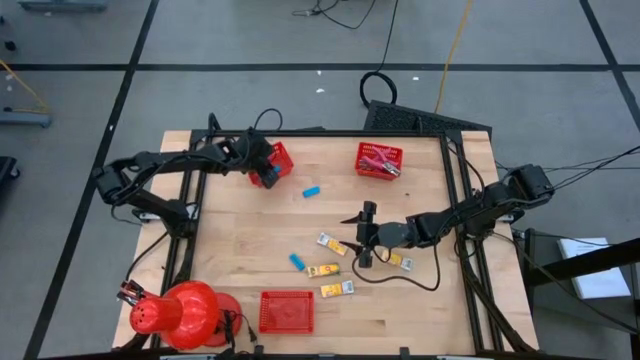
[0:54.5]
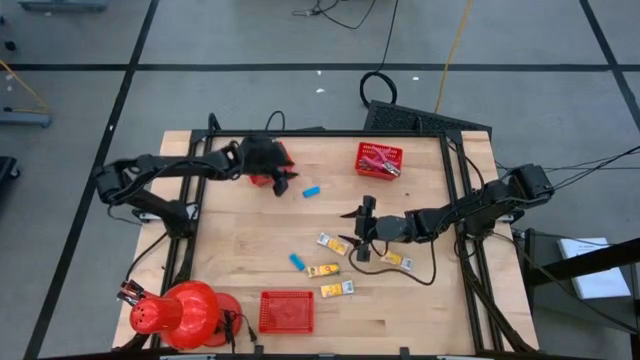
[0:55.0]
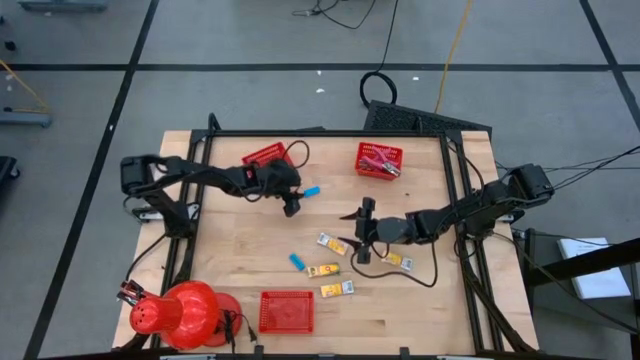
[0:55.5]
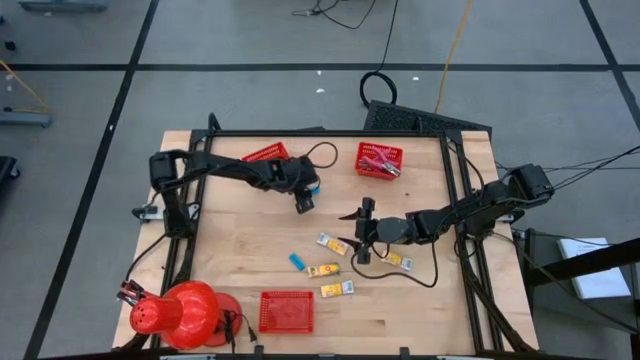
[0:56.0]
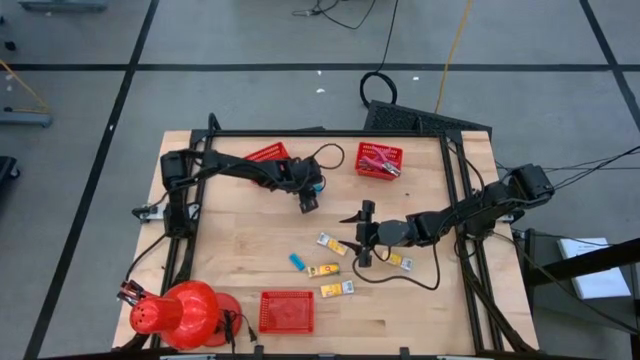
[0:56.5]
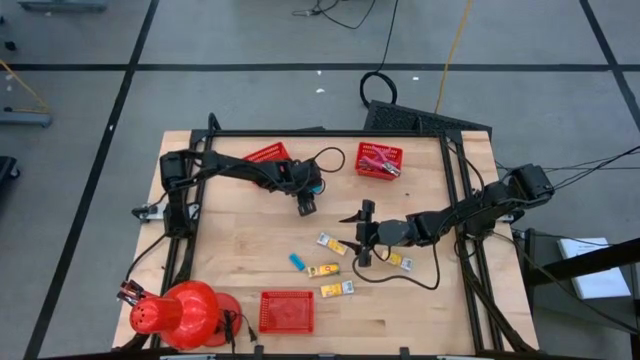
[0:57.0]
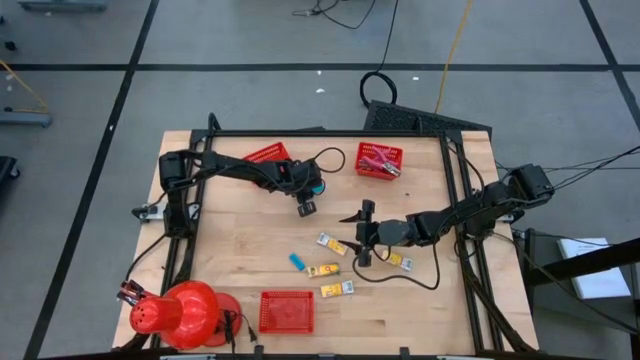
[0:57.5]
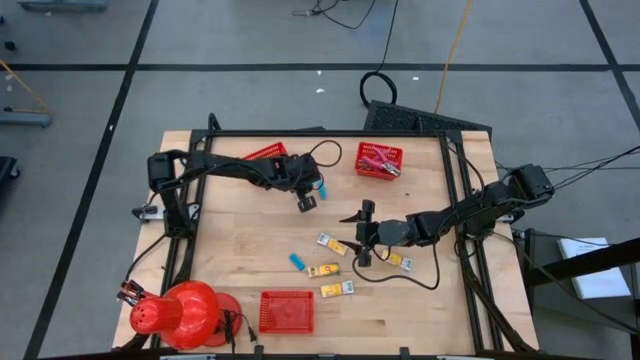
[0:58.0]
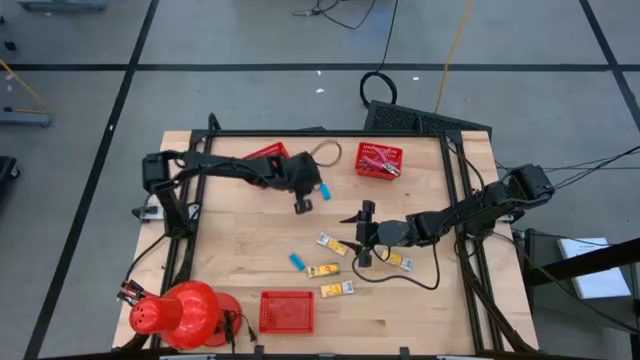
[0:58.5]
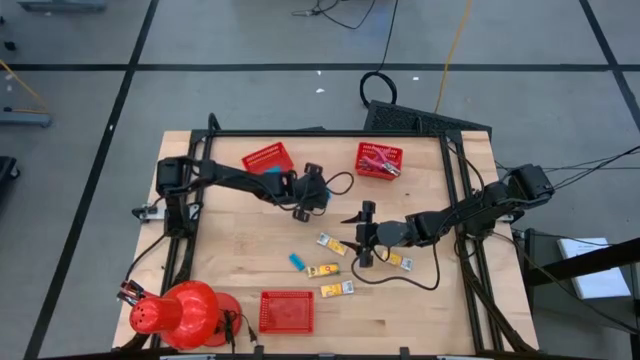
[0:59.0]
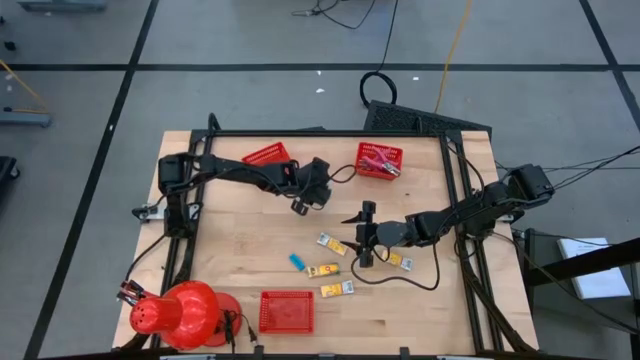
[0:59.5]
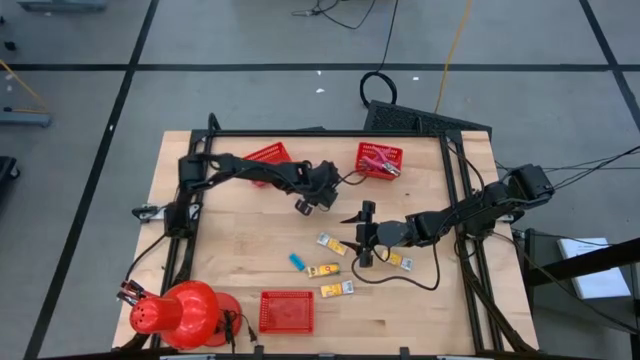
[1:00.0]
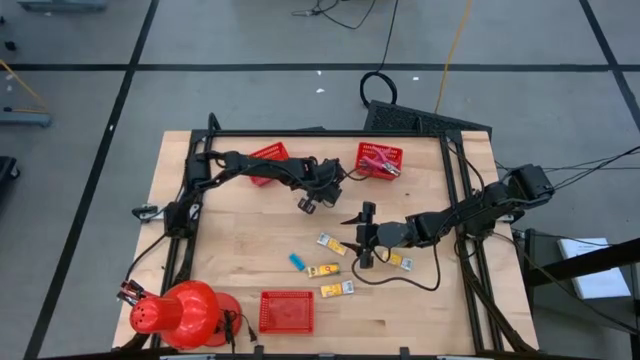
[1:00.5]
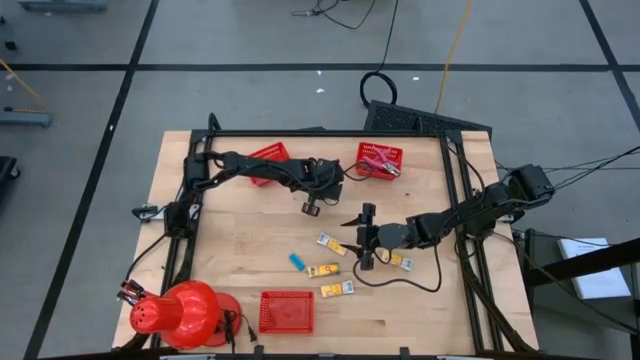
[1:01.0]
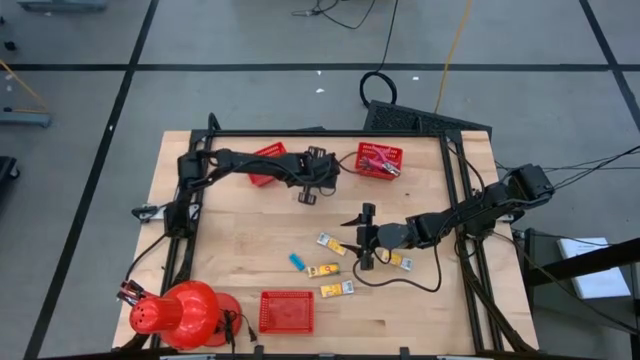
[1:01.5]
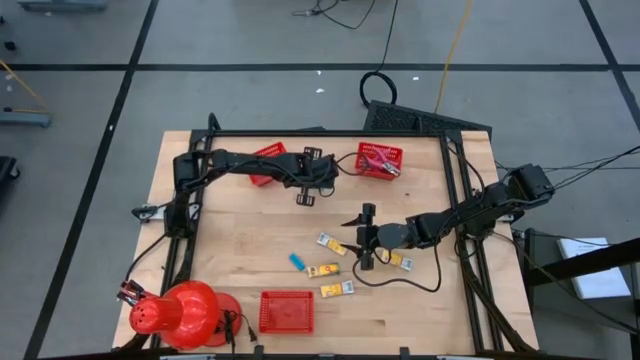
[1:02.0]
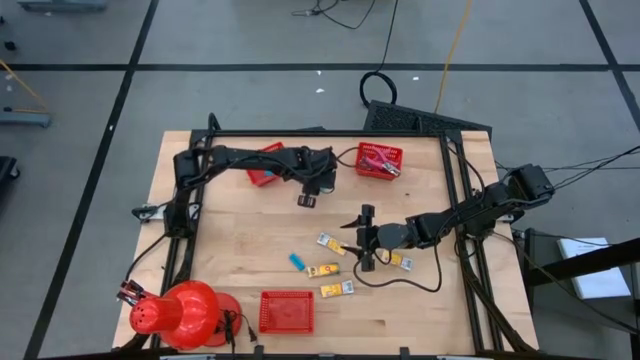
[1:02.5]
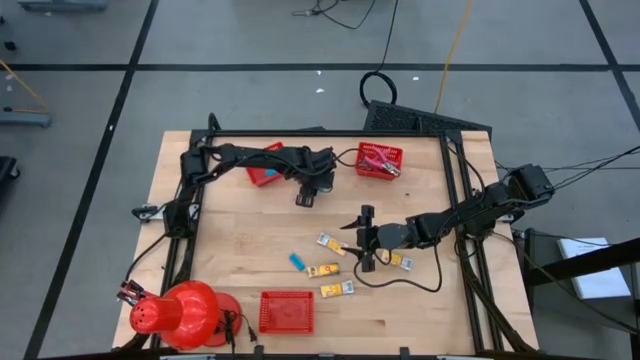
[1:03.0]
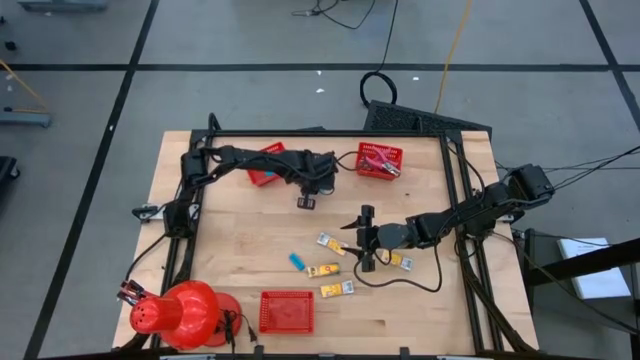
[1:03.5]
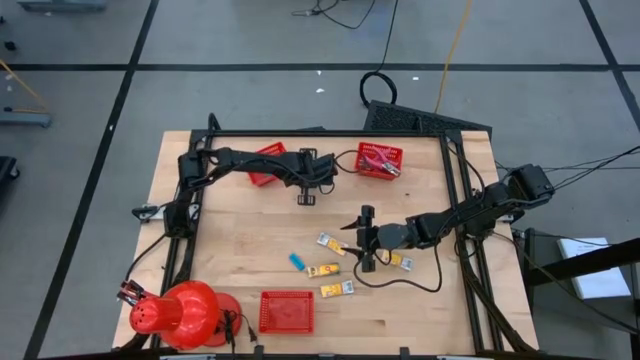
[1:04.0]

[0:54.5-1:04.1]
Task: Pick & Place School Supplies
Put the blue eraser into the top left red bin

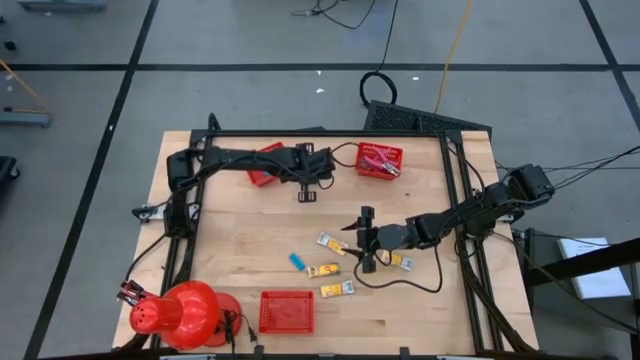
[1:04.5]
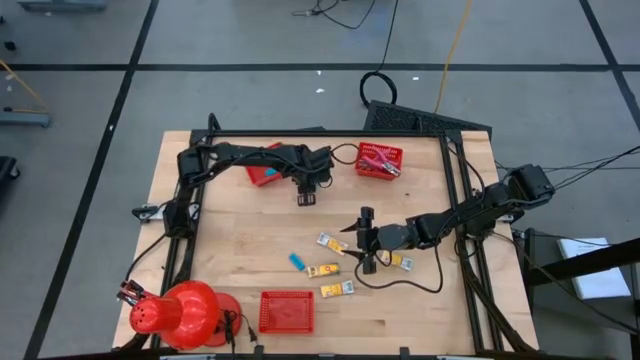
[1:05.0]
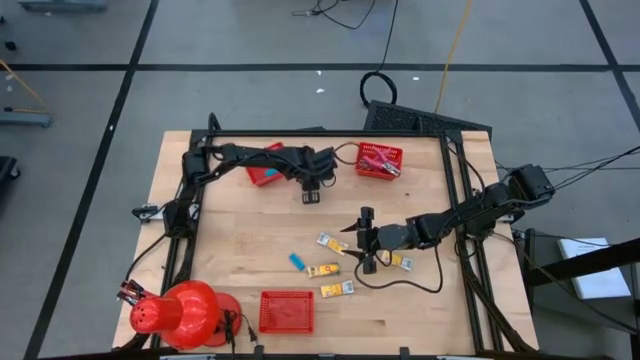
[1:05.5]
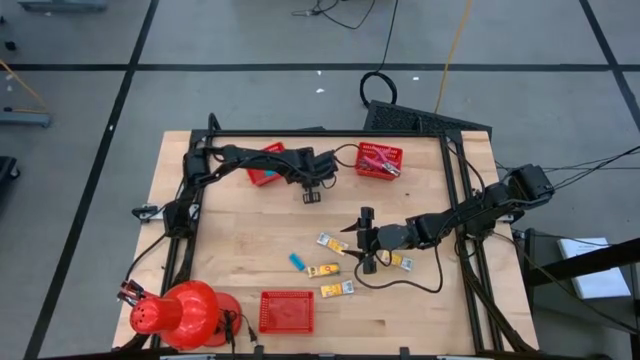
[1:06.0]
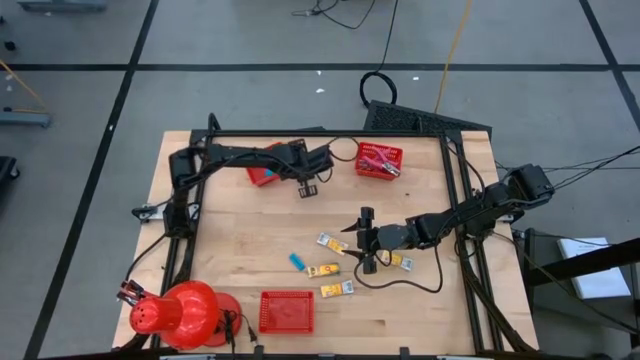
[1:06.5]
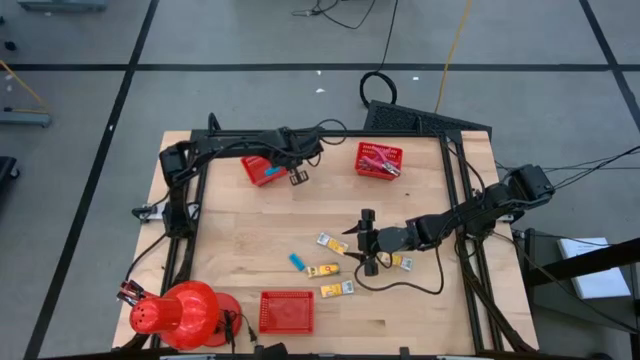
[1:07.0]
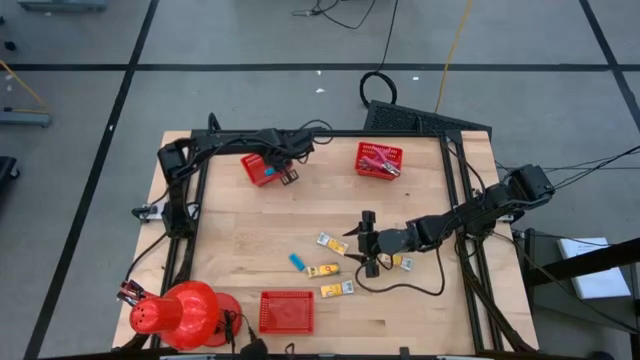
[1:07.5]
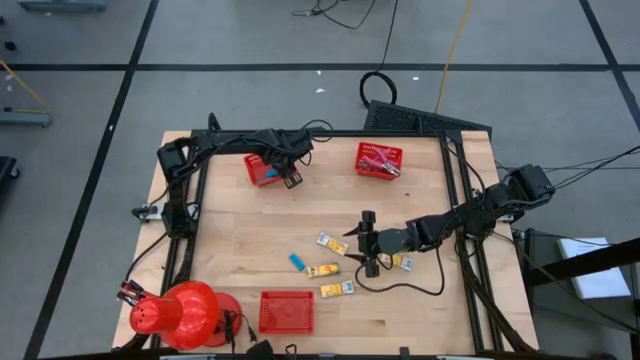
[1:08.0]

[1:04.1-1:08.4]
Put the blue eraser into the top left red bin

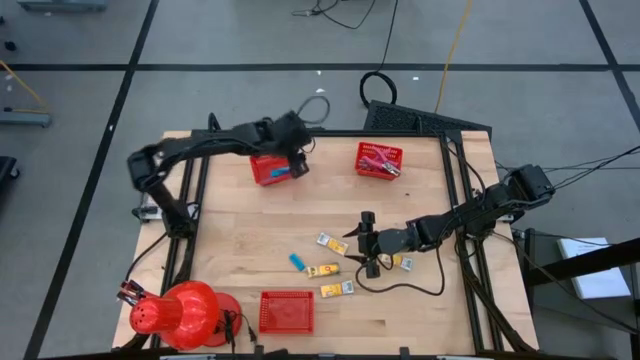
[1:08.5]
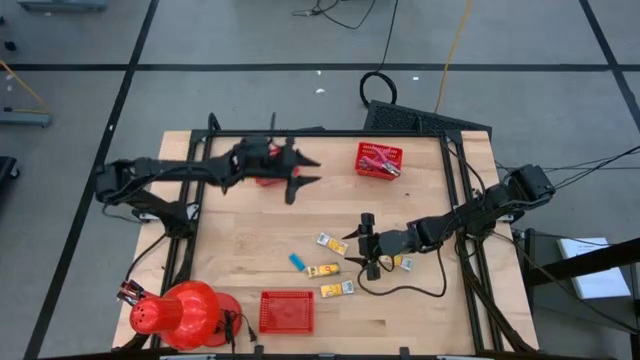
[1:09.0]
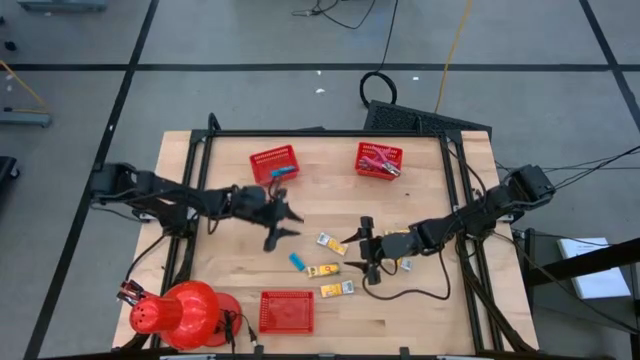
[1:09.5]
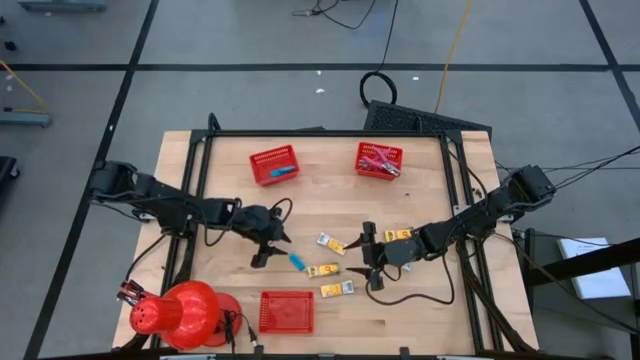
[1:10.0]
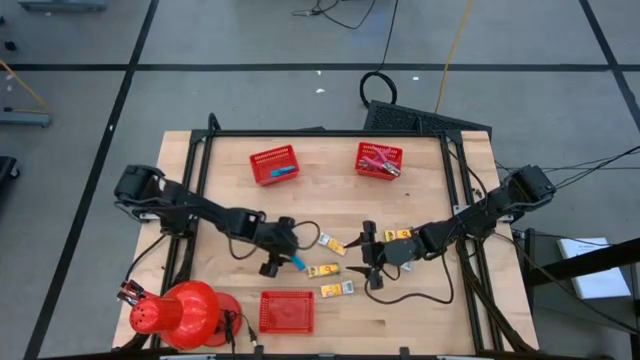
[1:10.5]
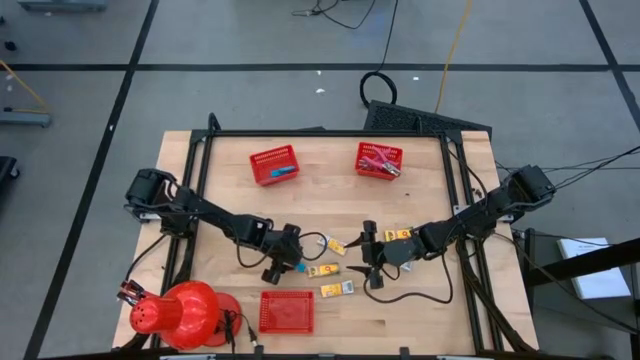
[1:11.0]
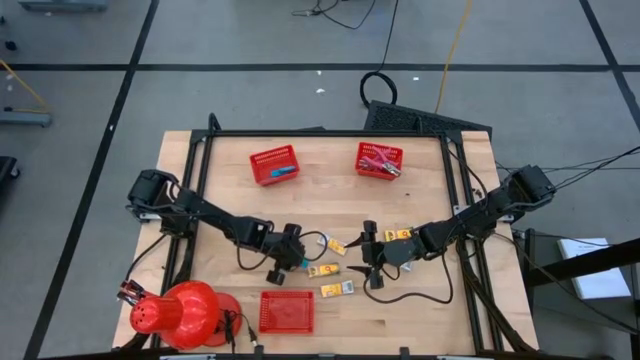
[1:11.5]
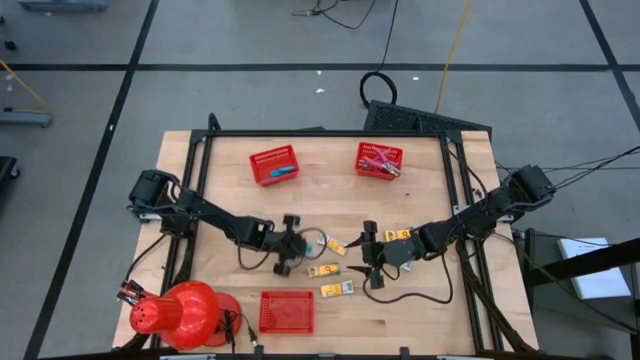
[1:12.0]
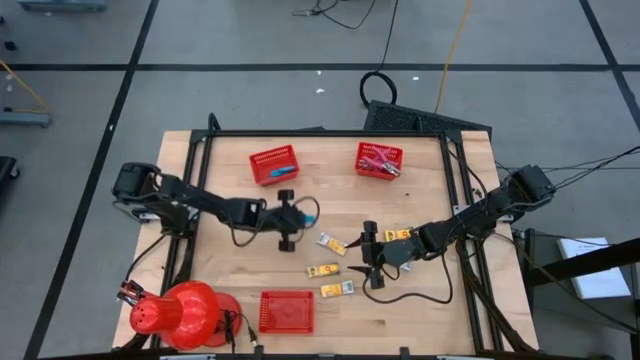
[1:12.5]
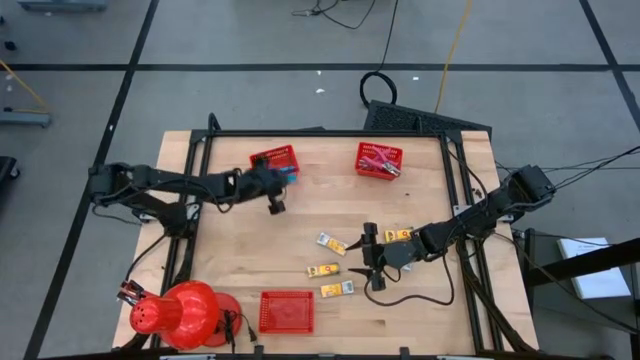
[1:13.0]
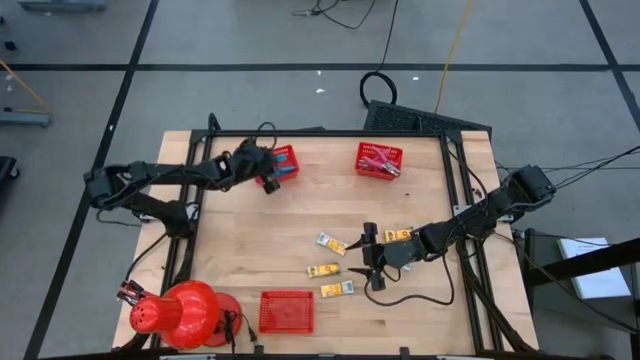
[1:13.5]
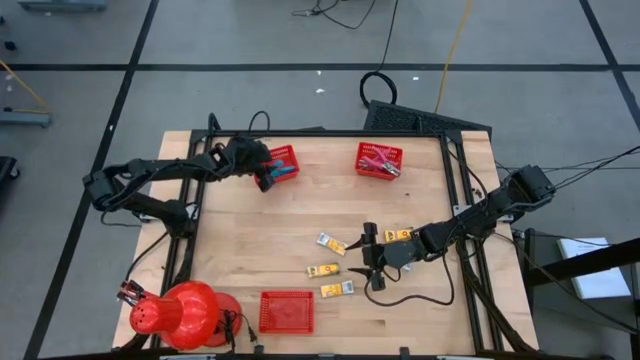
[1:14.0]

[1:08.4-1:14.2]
Put the blue eraser into the top left red bin

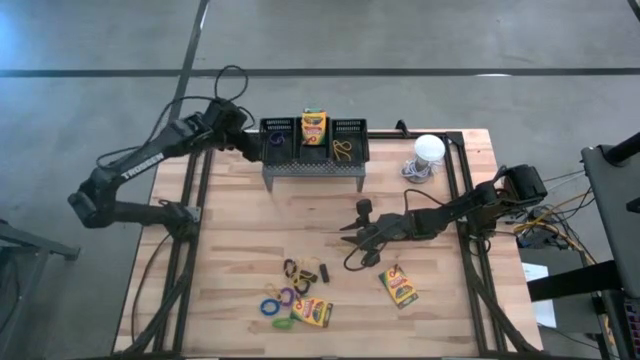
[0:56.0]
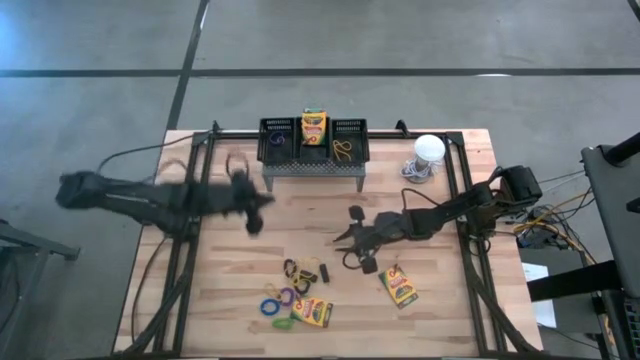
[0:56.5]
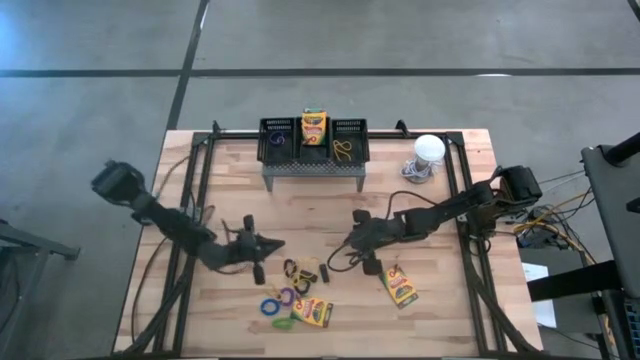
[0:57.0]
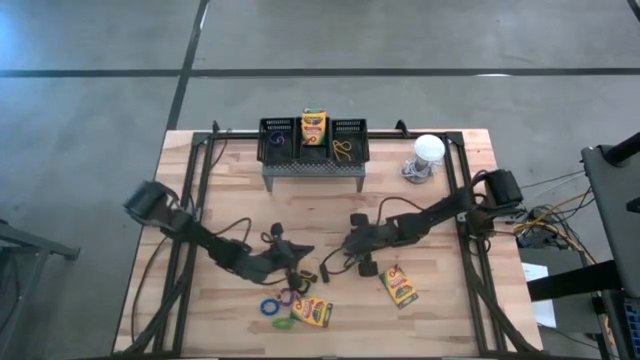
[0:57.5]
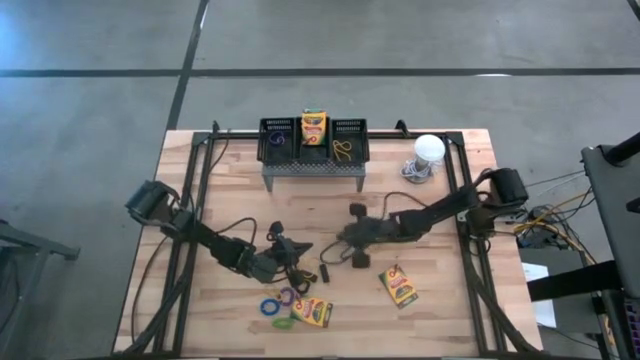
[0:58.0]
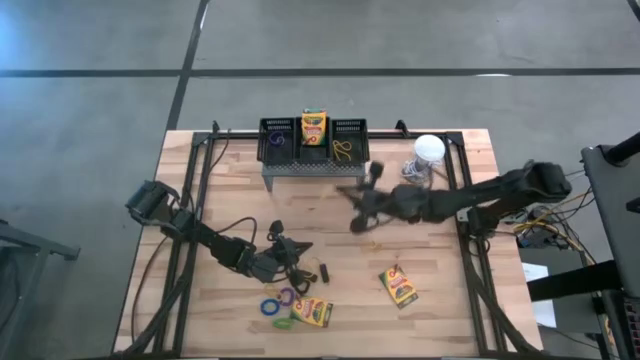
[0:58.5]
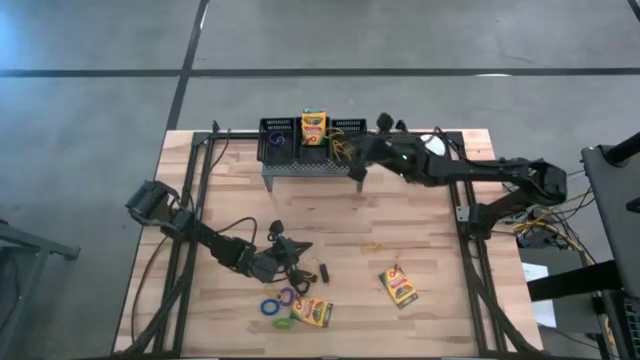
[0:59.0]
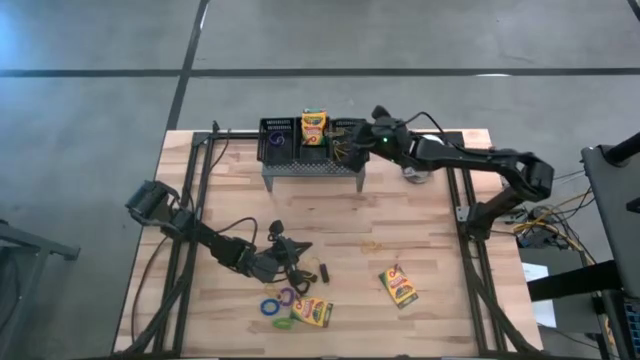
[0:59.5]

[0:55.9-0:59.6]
Task: Pick & Place Office Desk Supplies
Put the yellow rubber band into the right black basket on the shelf
